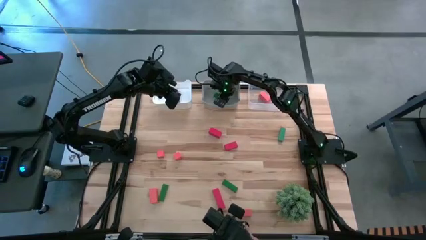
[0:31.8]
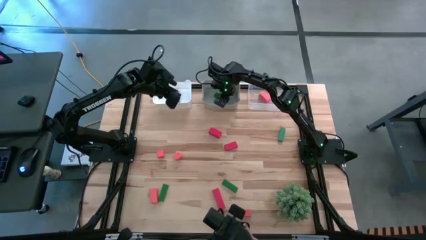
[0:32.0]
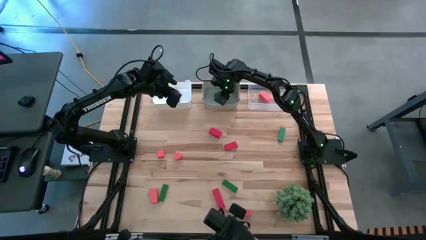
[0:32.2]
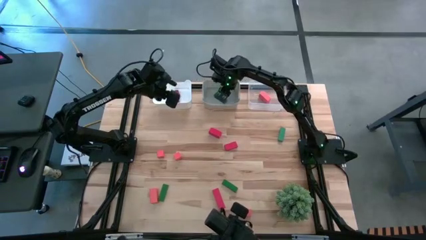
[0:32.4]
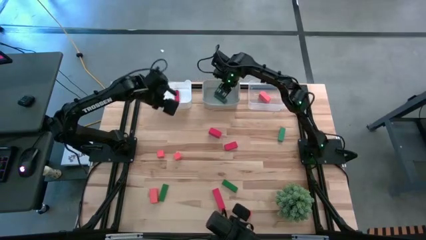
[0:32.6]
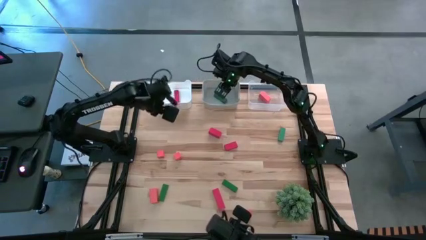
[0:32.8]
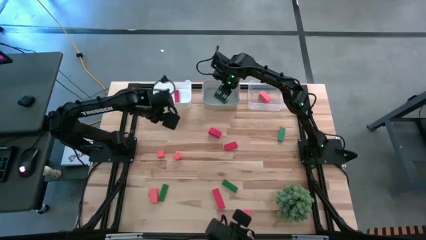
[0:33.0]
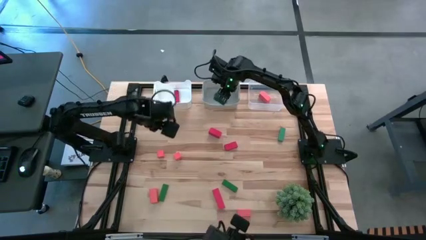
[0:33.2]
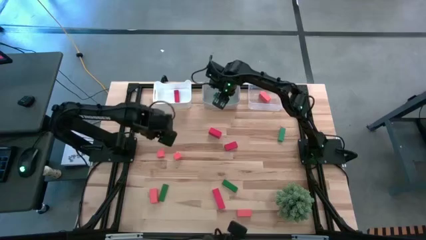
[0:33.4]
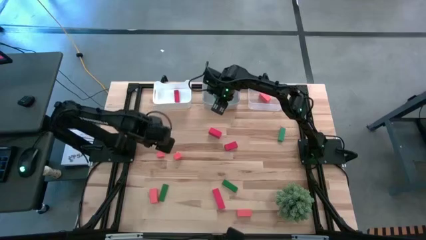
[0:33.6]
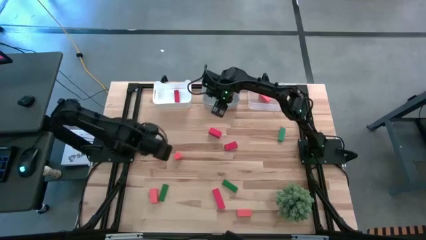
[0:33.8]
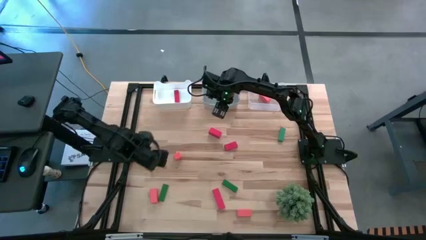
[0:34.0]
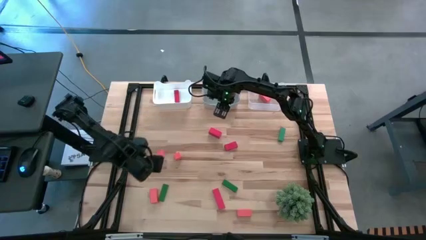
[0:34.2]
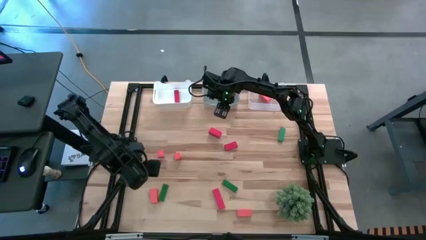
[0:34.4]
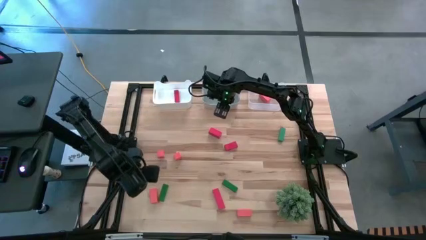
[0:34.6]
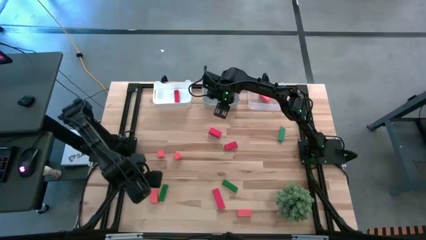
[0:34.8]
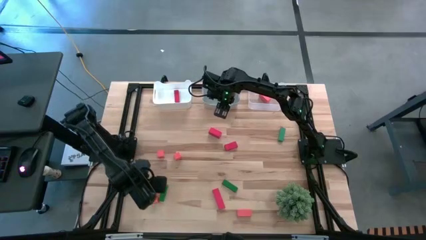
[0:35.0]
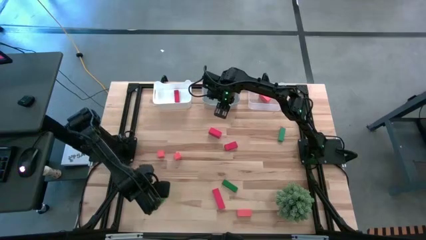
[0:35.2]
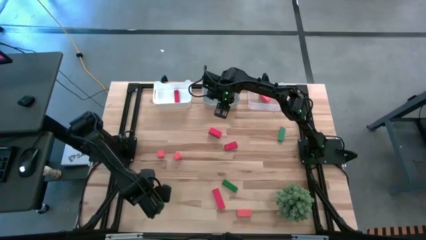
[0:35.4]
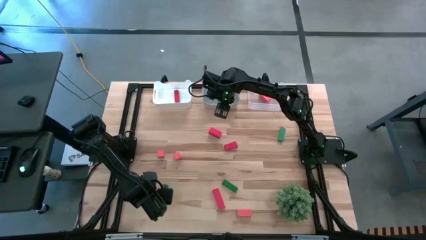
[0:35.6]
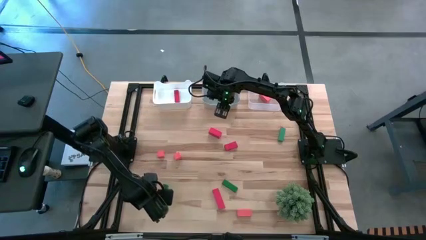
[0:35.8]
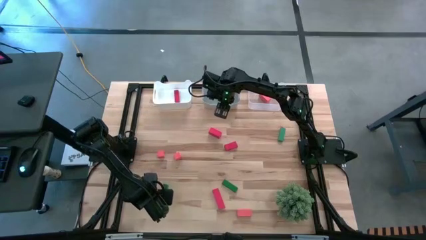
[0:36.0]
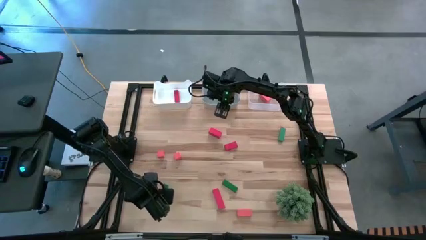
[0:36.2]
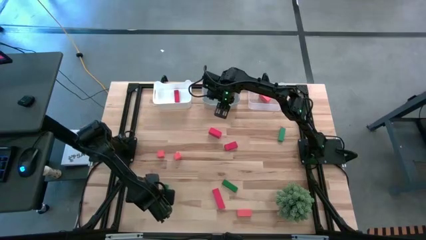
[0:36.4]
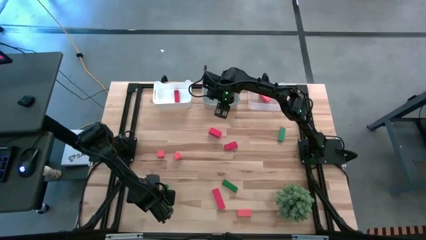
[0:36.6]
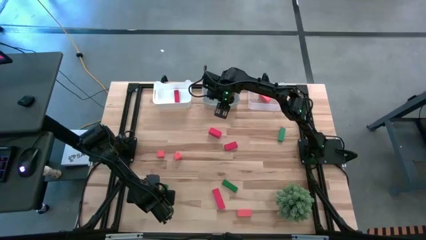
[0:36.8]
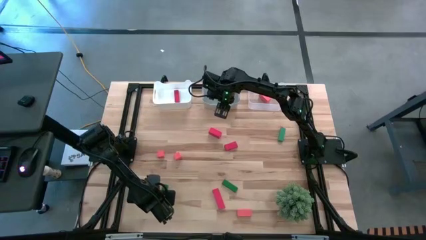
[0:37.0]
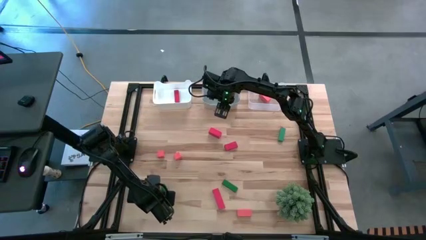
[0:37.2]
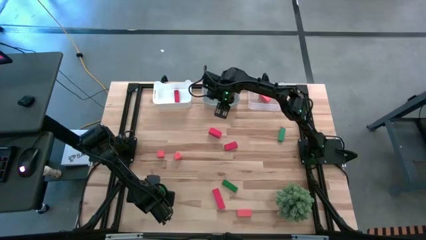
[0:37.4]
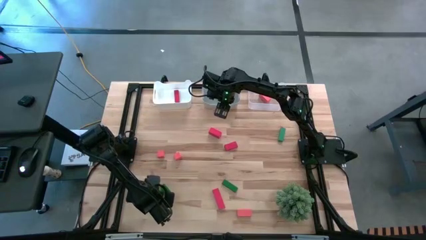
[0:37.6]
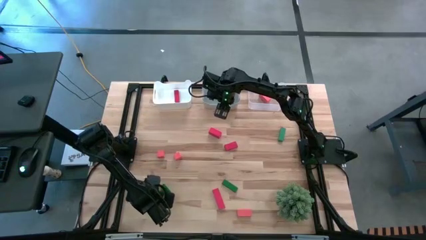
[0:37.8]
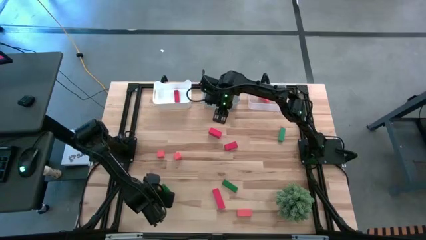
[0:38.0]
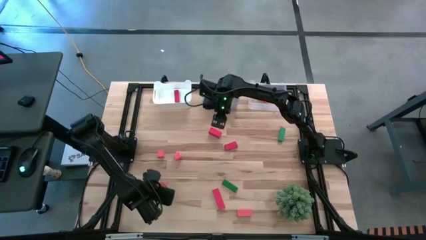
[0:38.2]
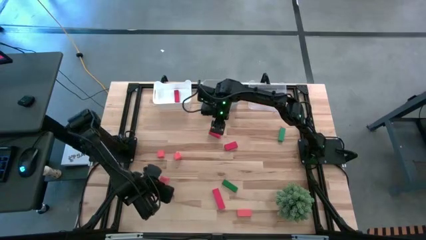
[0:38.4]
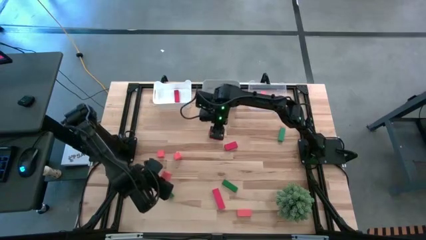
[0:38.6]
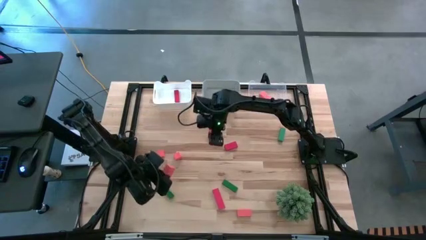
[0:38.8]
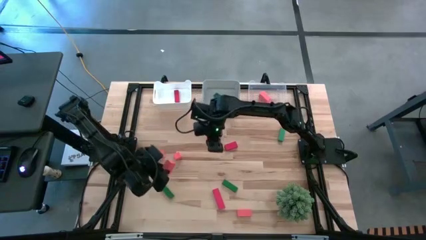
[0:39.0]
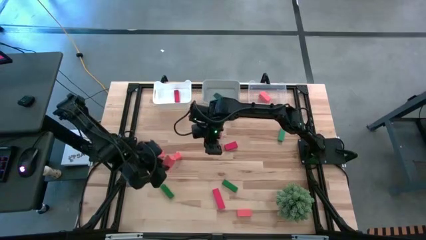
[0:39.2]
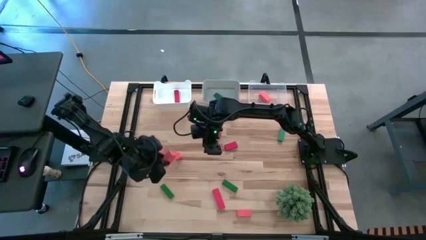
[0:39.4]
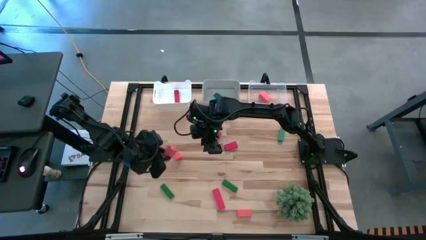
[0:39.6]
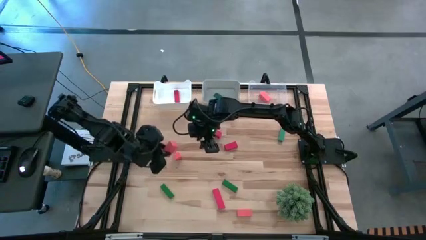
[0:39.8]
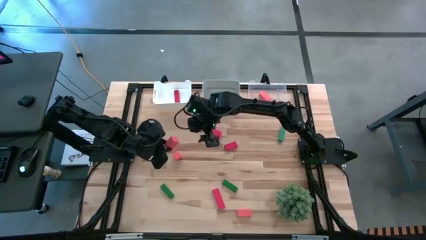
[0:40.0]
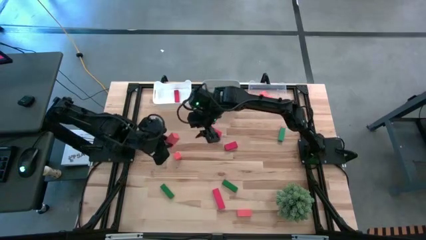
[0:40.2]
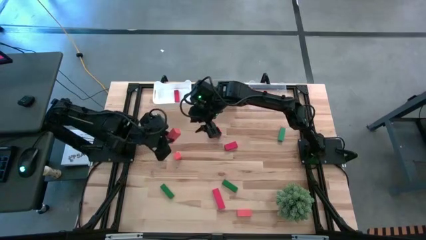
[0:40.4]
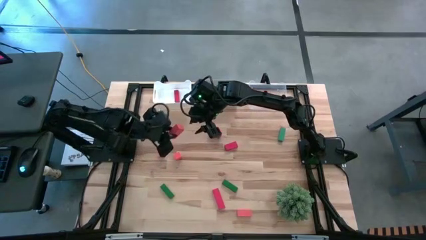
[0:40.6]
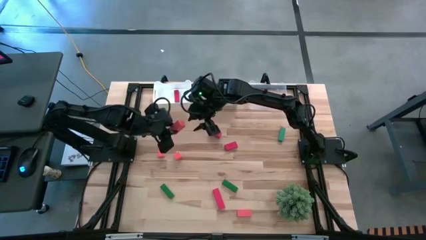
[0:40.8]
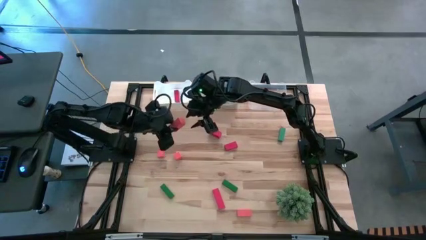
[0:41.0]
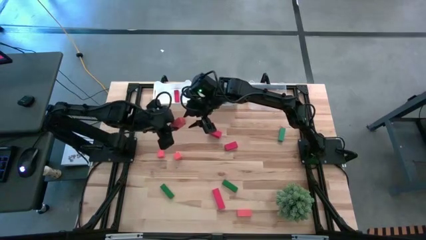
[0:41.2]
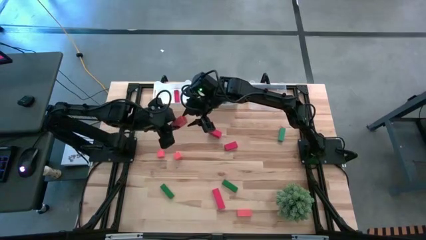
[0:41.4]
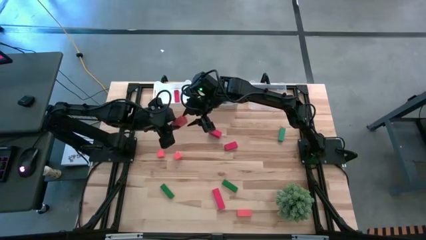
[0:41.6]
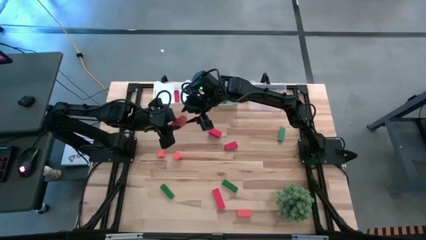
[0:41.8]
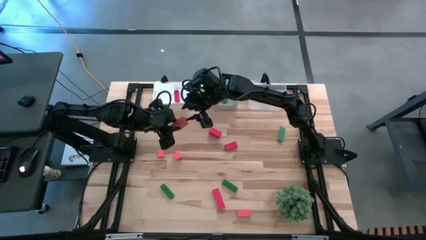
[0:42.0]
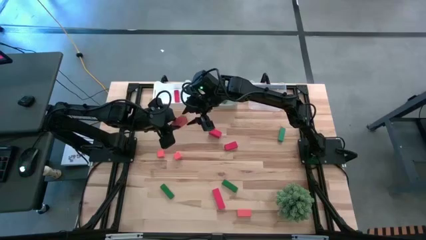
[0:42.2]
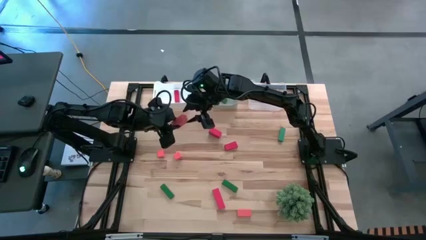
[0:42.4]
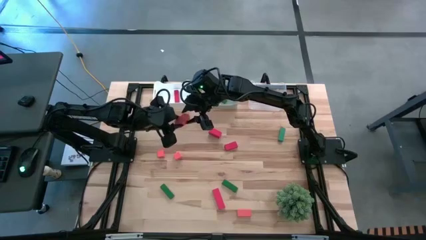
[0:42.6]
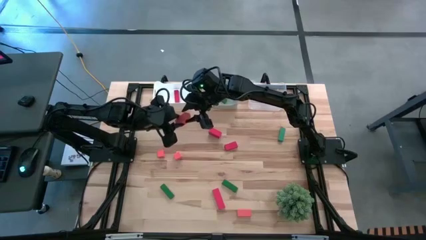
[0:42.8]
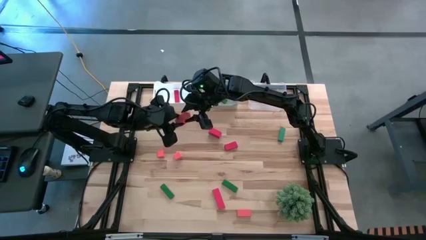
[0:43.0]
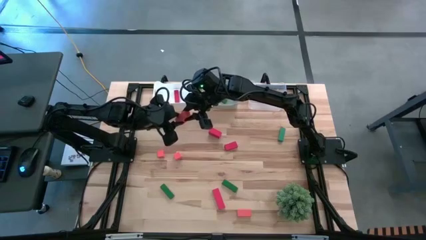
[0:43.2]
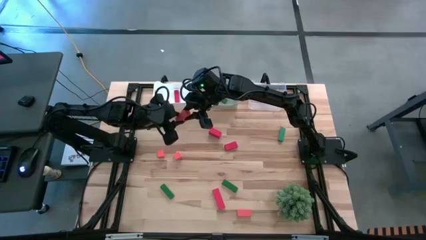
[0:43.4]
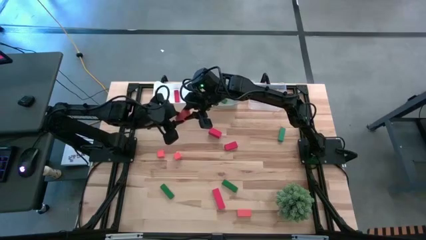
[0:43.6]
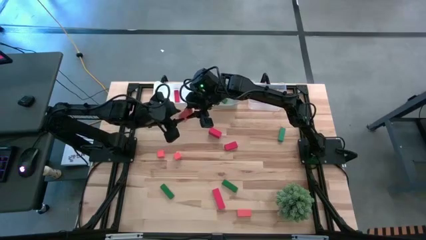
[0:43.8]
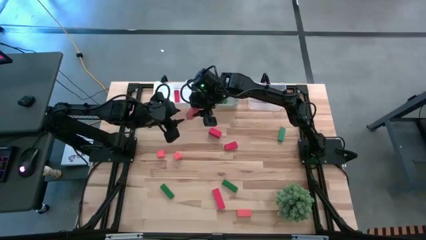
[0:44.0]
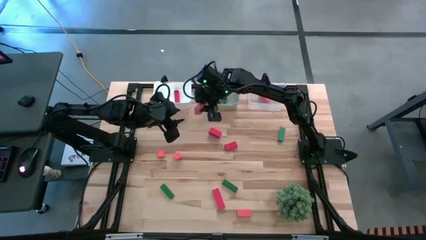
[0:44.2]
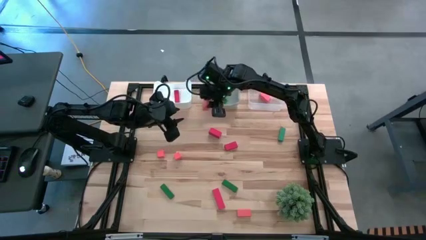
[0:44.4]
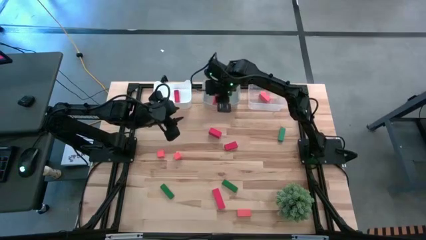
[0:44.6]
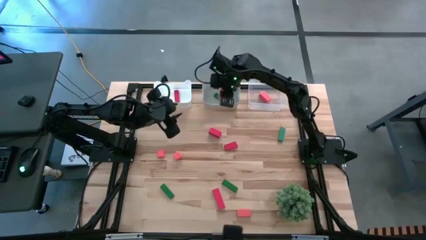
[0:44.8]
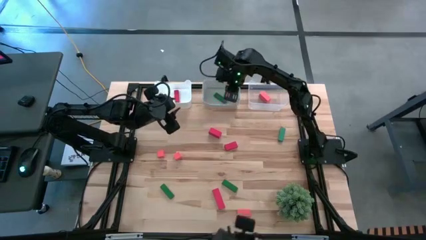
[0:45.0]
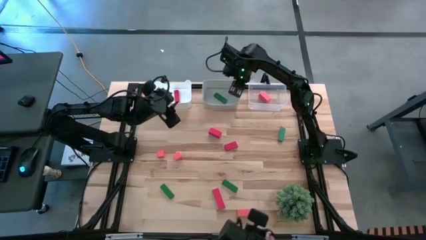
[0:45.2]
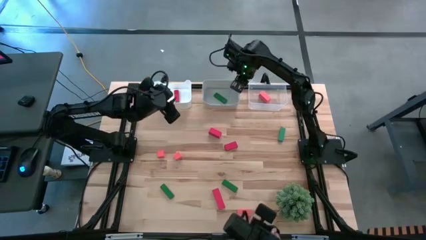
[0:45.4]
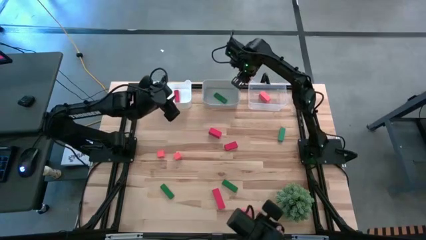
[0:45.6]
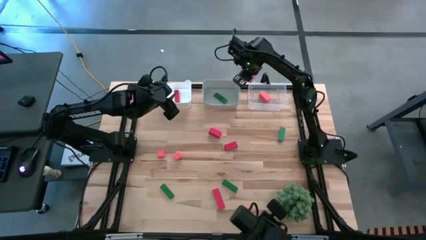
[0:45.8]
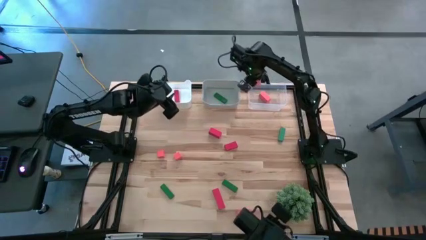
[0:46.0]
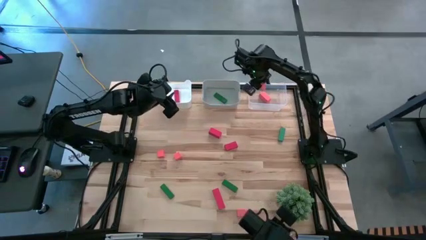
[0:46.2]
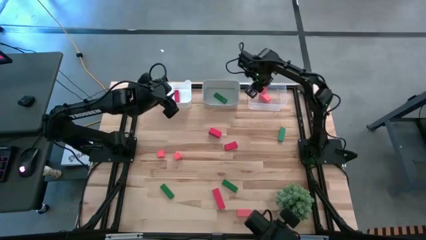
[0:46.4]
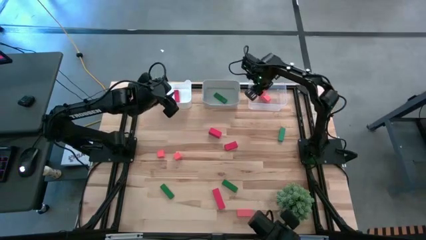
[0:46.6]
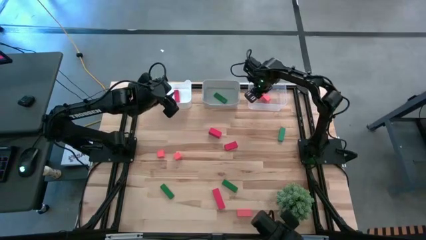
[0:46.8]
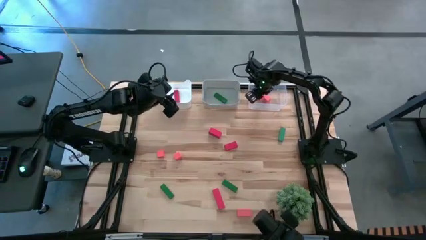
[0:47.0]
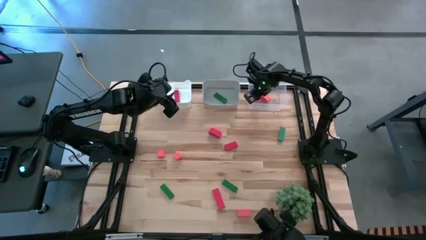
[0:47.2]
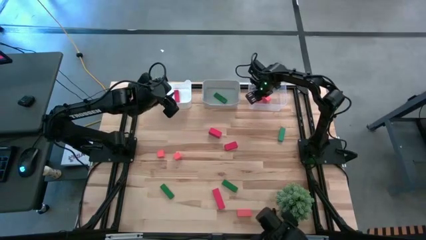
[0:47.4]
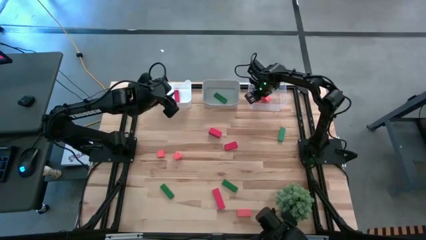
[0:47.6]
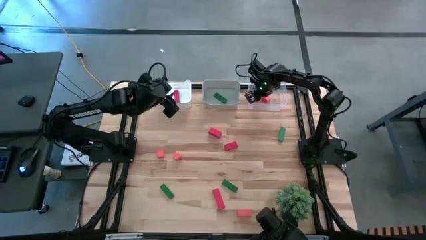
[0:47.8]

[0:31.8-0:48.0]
Task: Sort & place blocks by color
Put the bottom left orange block into the transparent bin
